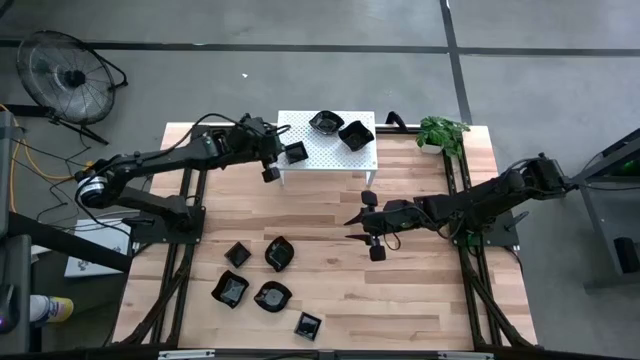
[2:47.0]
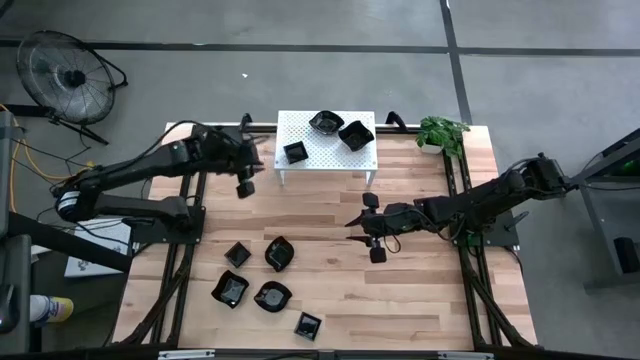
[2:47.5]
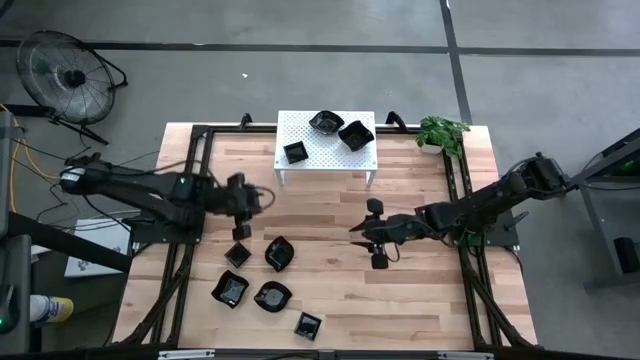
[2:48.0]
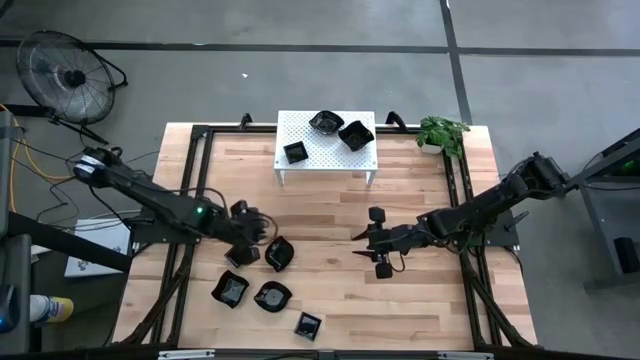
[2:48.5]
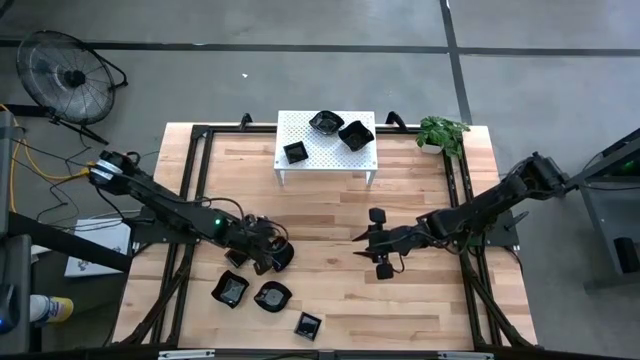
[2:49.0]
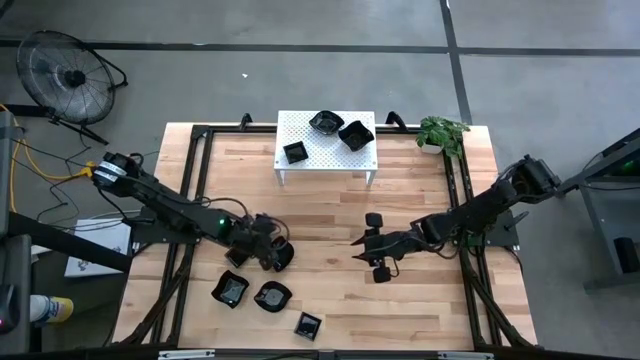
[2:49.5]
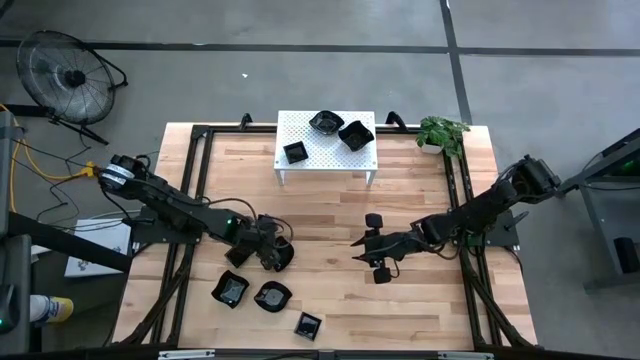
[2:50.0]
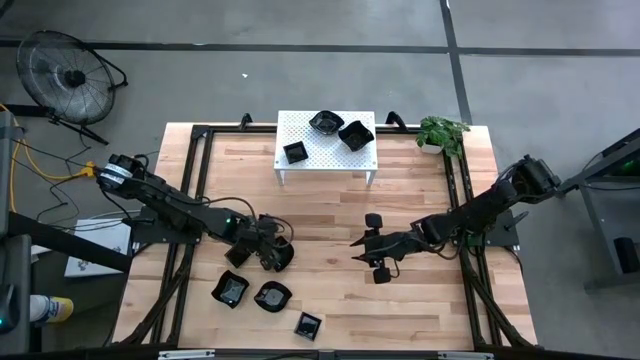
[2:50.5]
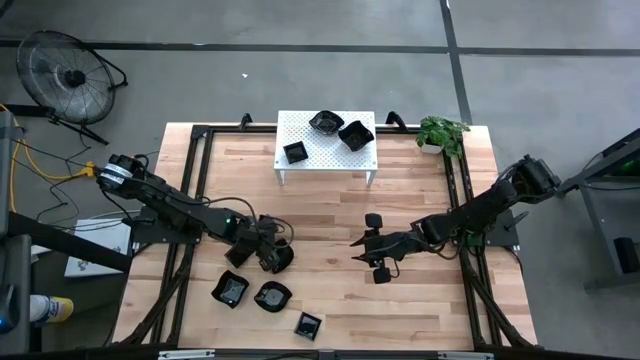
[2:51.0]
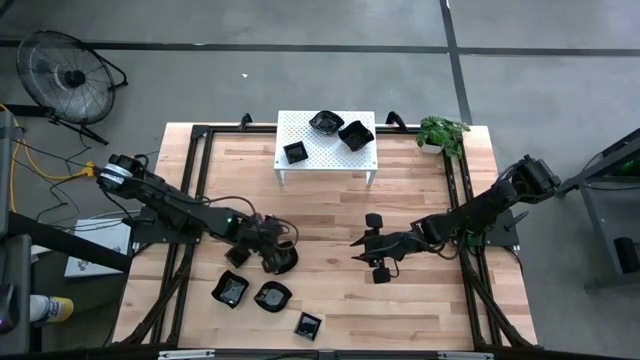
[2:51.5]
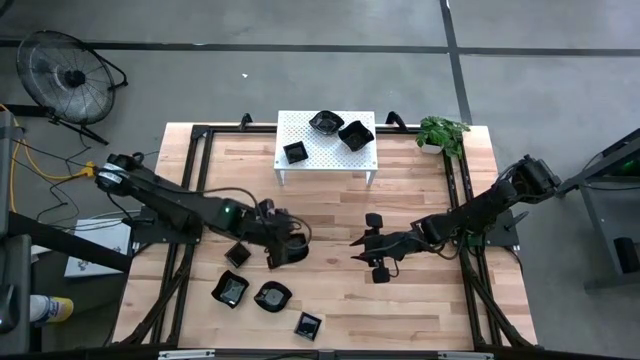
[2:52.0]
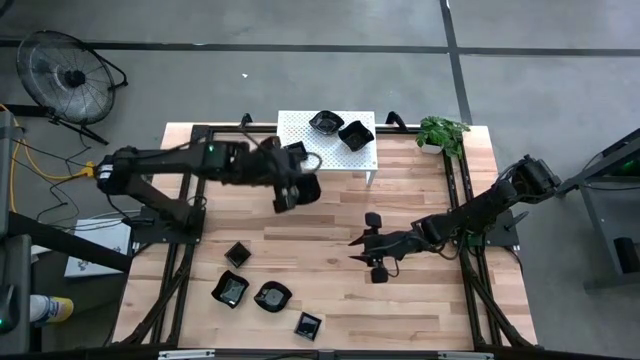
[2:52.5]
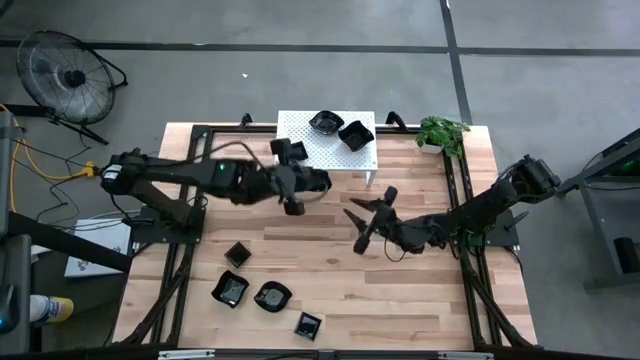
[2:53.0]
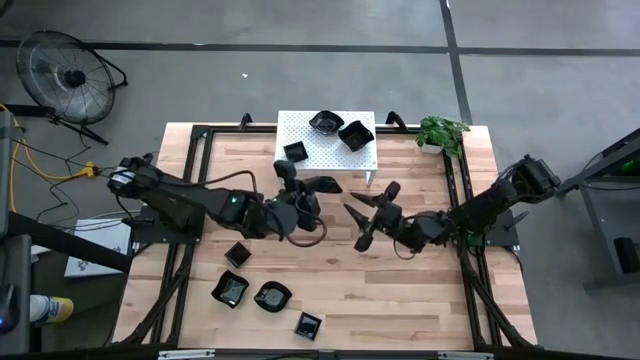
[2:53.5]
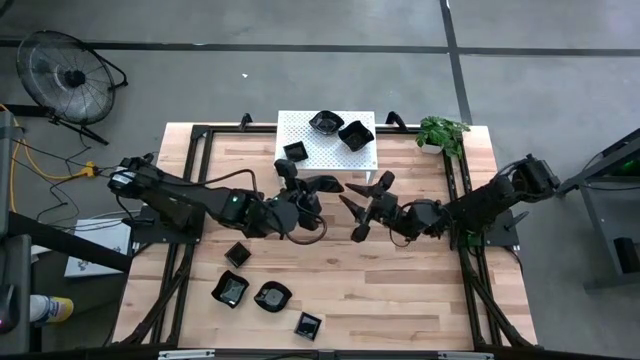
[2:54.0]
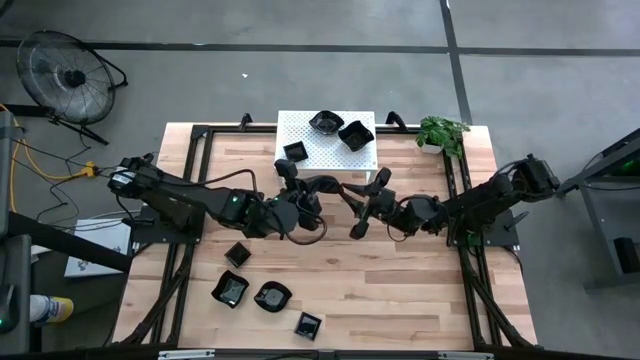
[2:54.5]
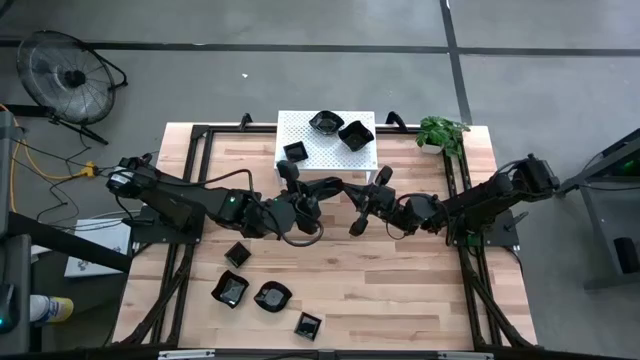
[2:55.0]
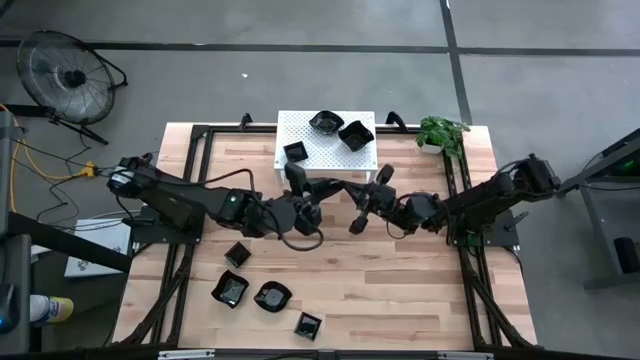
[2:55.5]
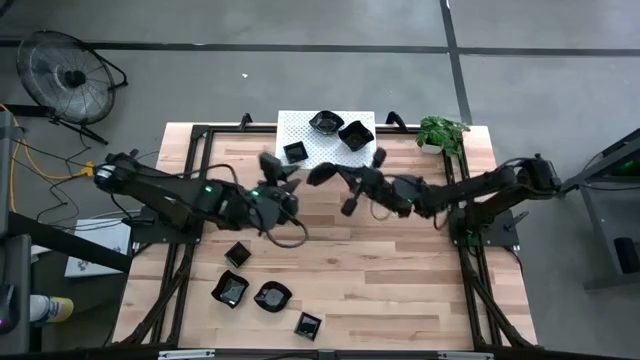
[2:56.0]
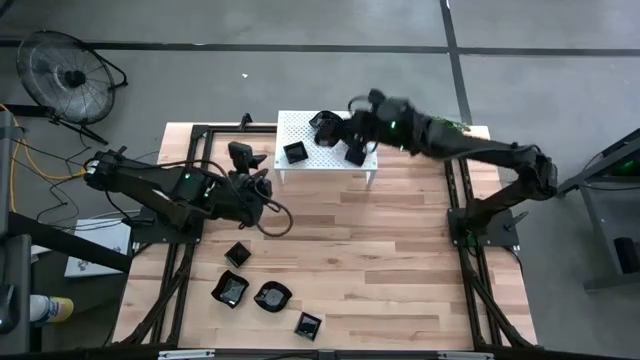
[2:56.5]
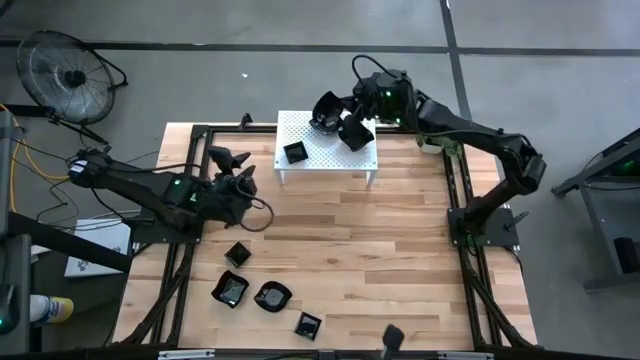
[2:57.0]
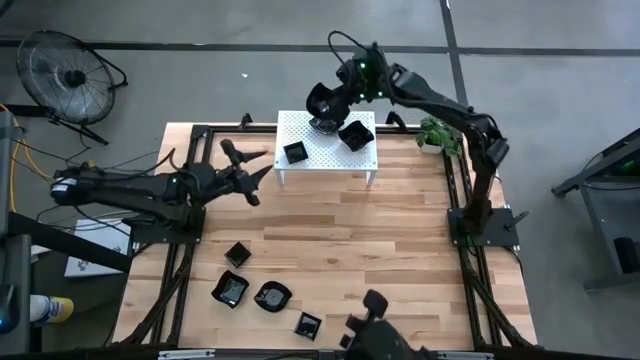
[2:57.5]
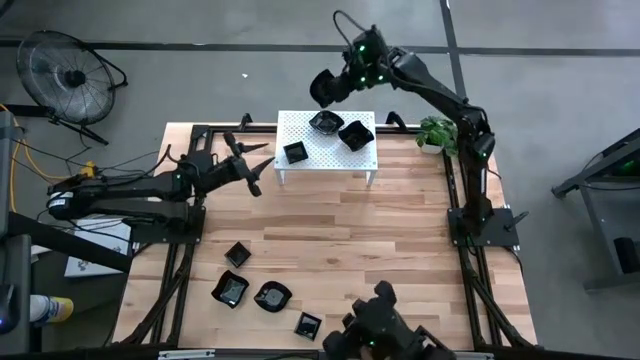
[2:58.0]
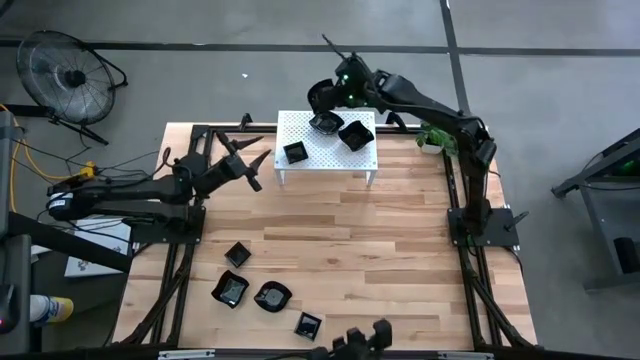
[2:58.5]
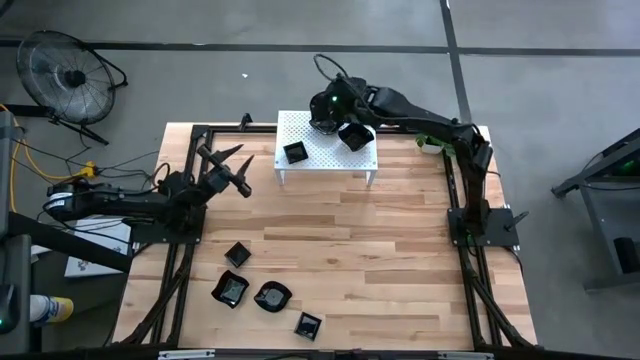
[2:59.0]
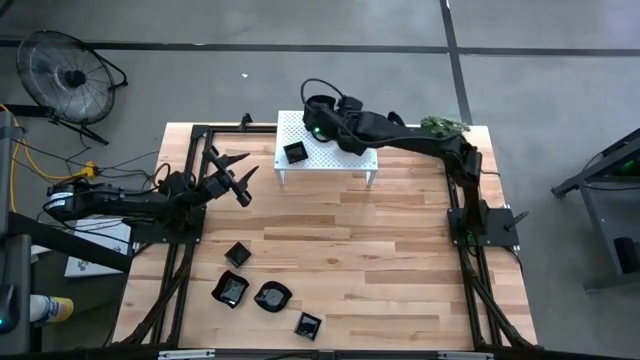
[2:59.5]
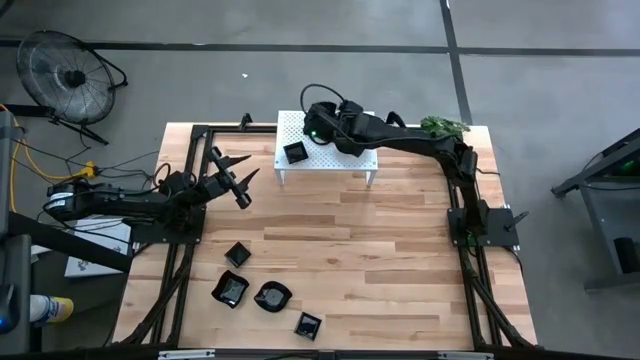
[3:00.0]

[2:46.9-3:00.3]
Task: Pick & Place Mini shaped plates
Stack the black leaf-shaped plate on top of the black leaf-shaped plate on the shelf

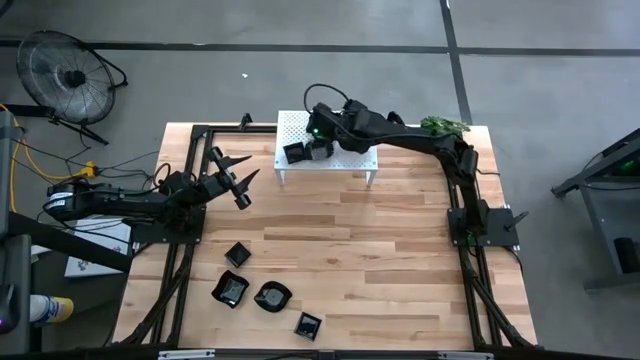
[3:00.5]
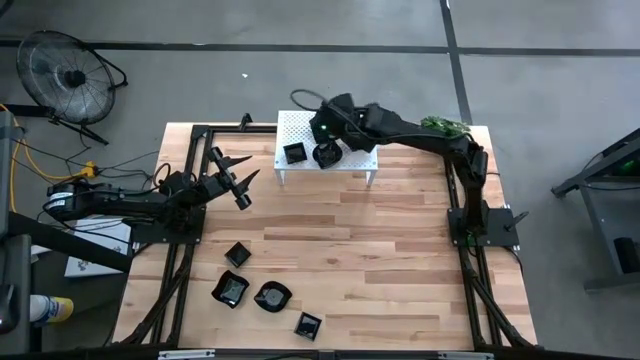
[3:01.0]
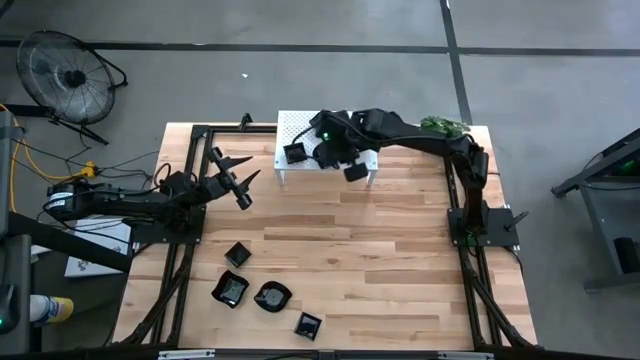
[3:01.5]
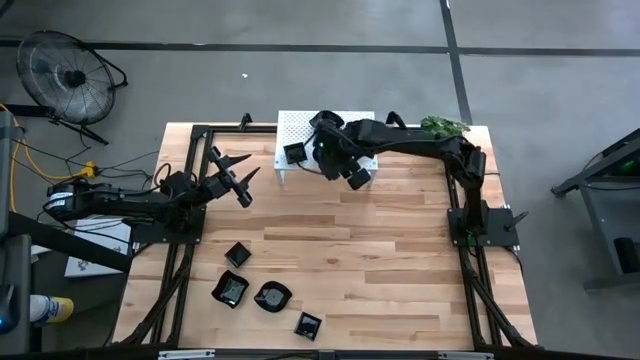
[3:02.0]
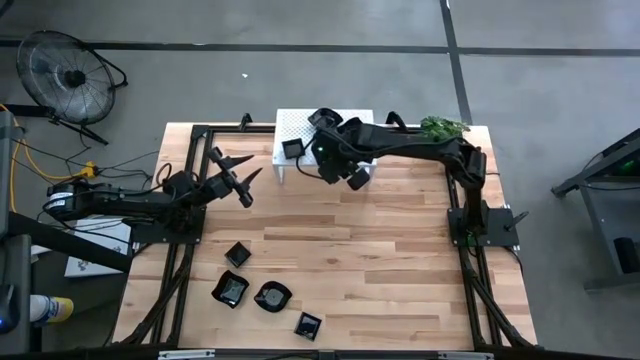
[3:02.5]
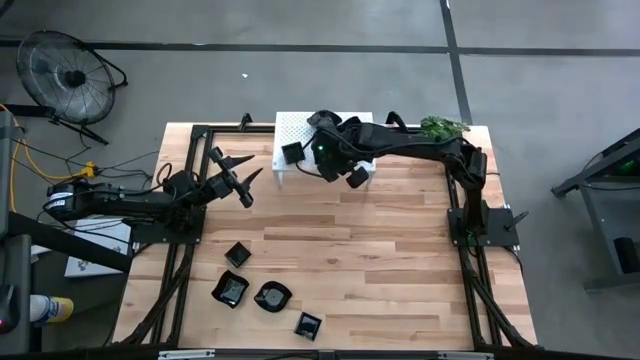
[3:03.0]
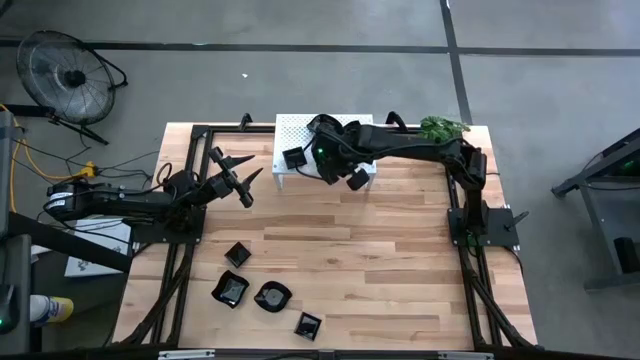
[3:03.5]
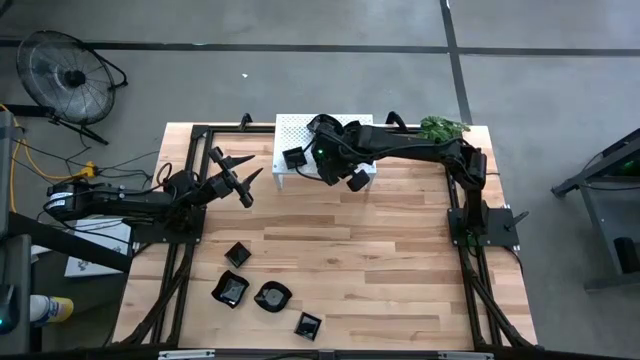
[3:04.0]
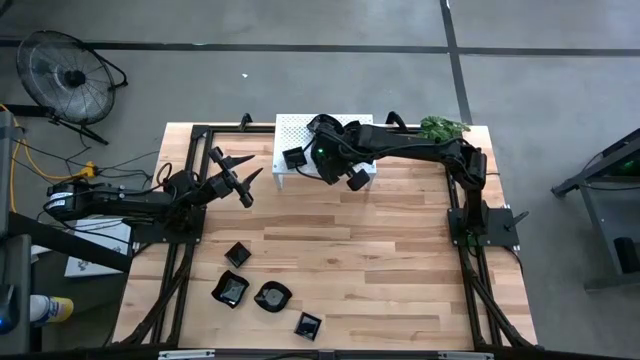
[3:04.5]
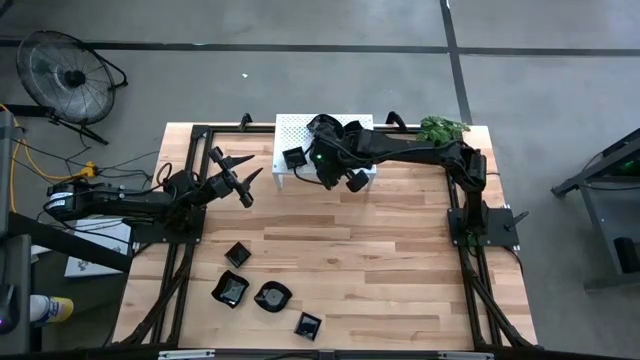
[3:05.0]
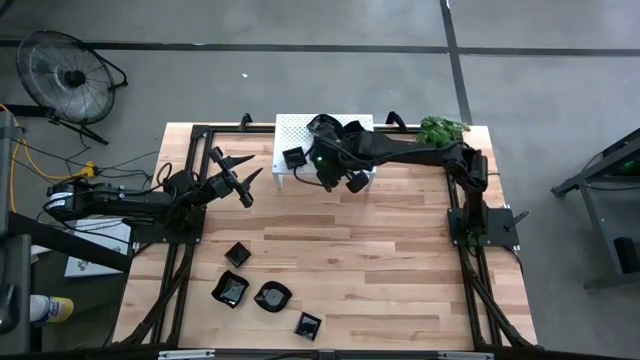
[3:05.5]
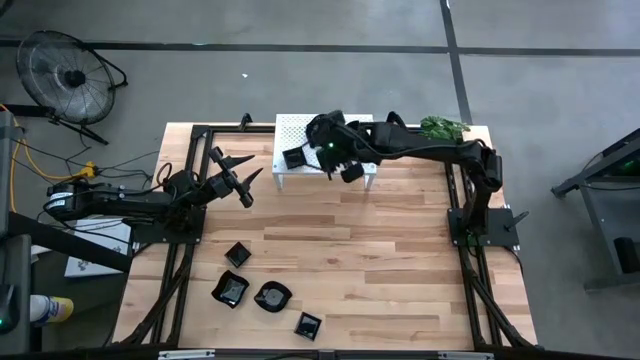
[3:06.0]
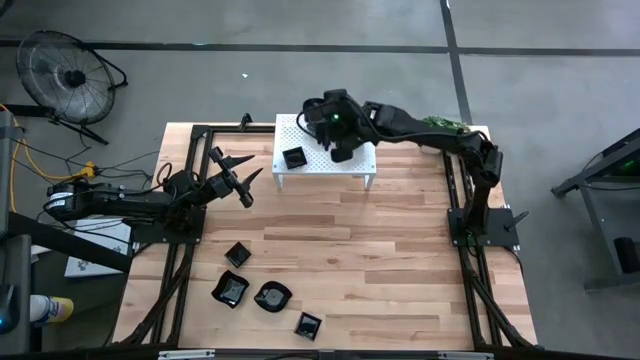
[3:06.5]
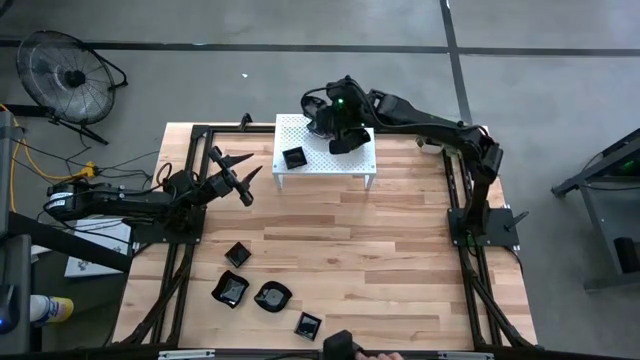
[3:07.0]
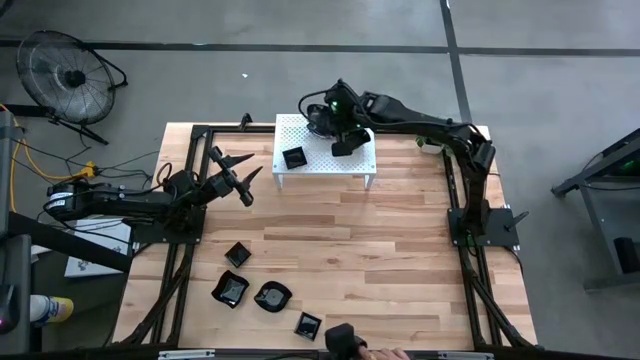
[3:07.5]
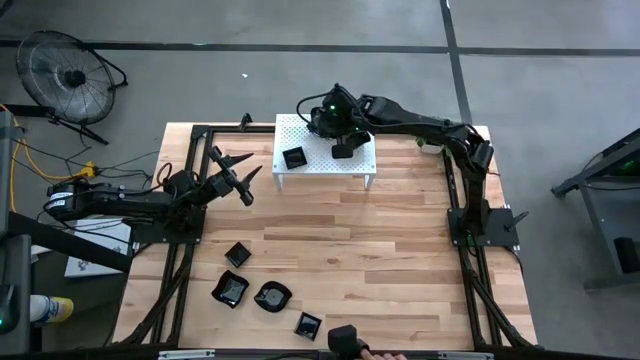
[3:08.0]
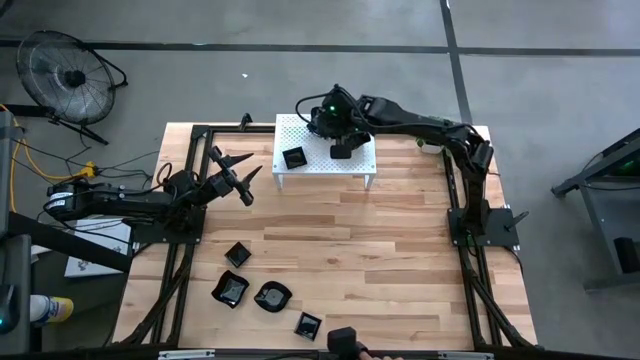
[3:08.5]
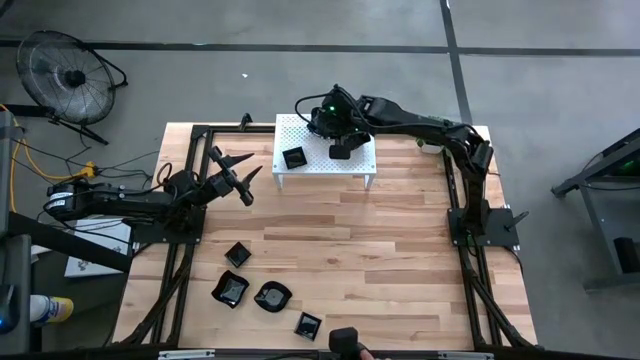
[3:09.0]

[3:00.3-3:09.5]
Stack the black leaf-shaped plate on top of the black leaf-shaped plate on the shelf
